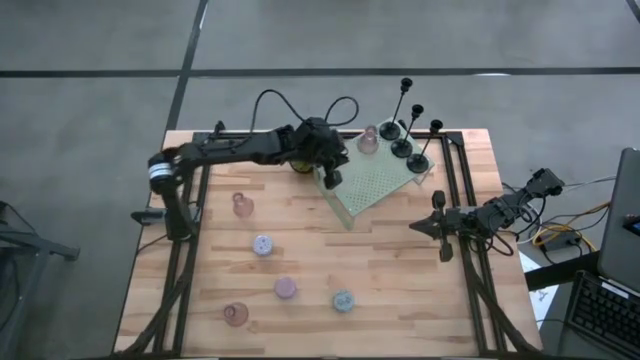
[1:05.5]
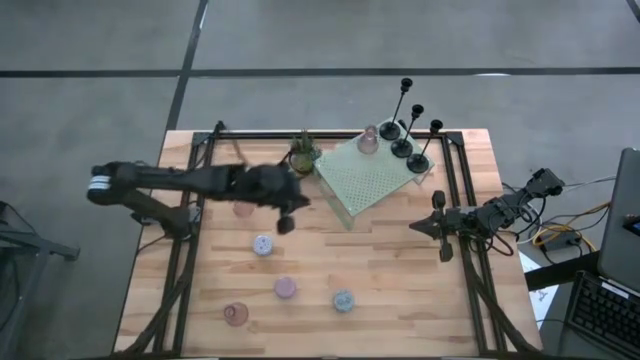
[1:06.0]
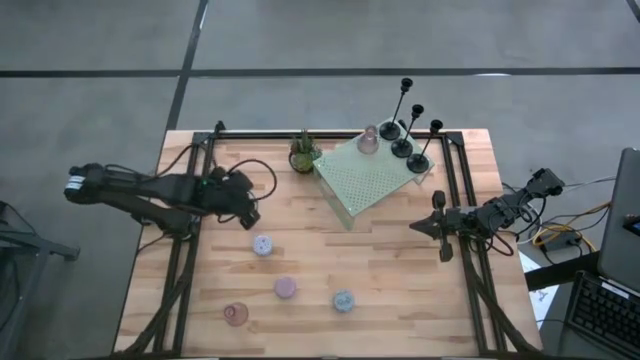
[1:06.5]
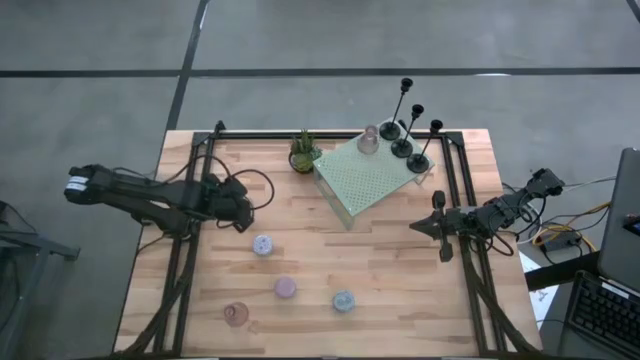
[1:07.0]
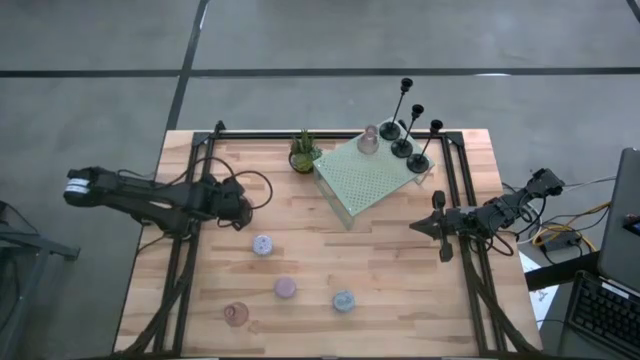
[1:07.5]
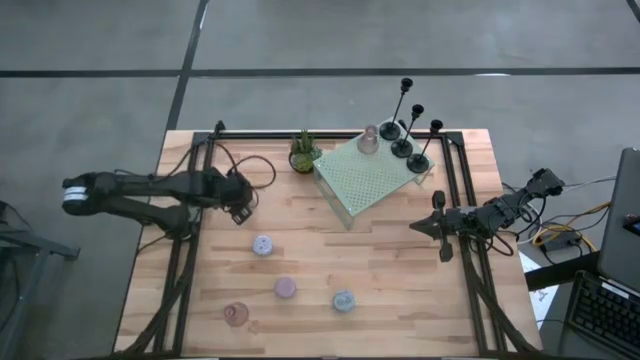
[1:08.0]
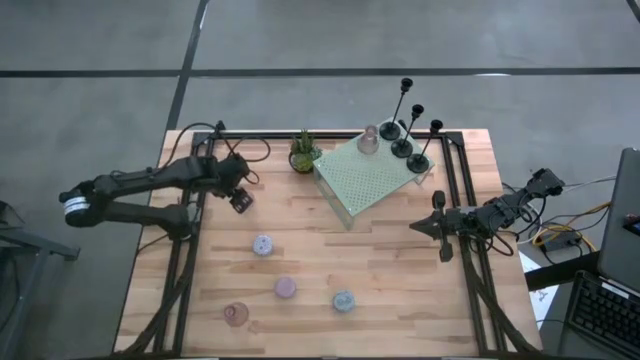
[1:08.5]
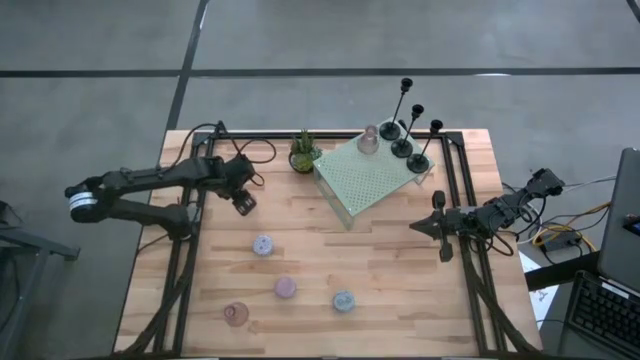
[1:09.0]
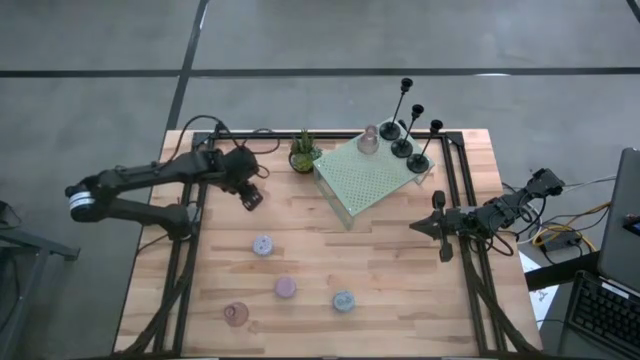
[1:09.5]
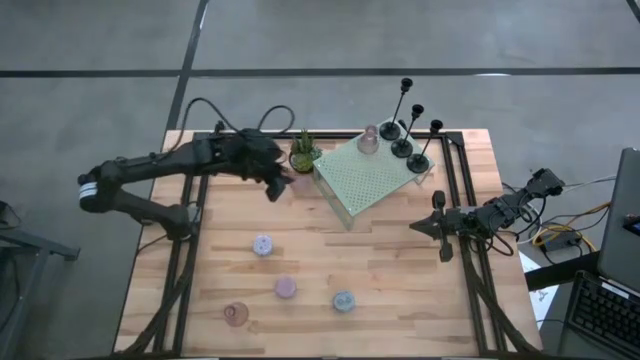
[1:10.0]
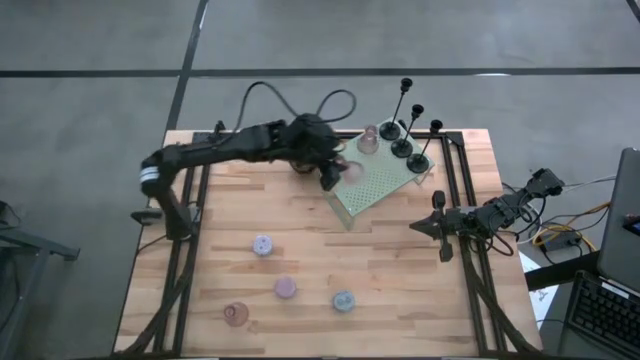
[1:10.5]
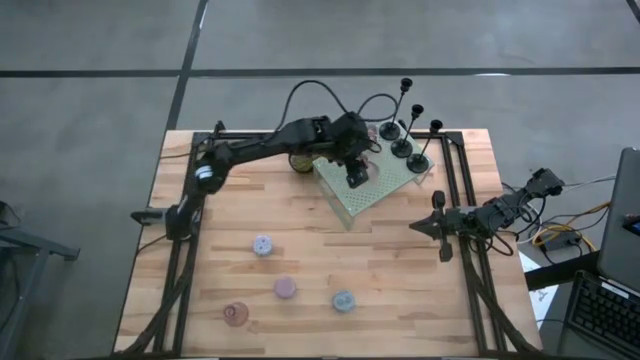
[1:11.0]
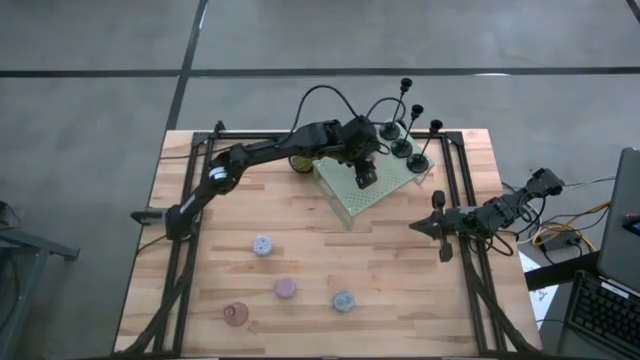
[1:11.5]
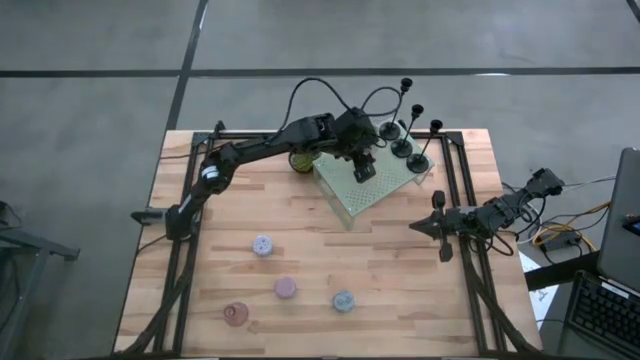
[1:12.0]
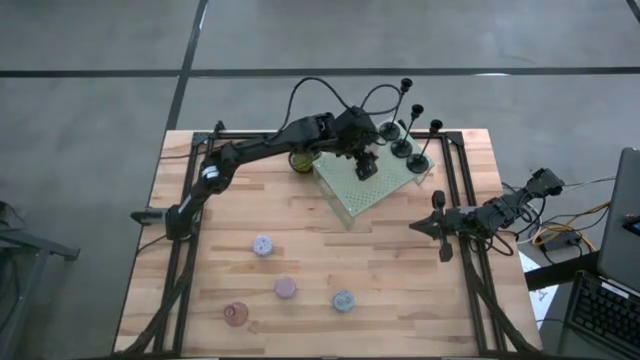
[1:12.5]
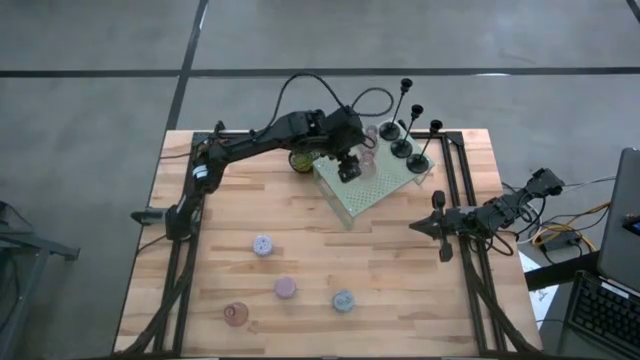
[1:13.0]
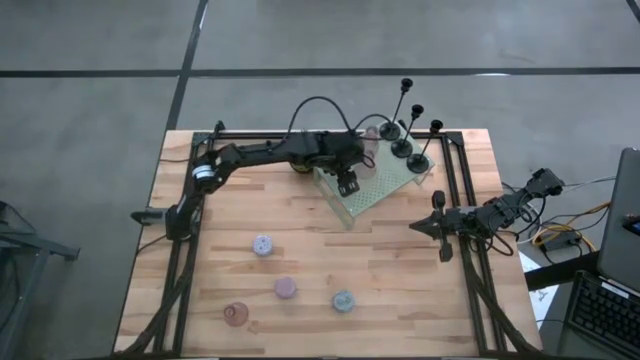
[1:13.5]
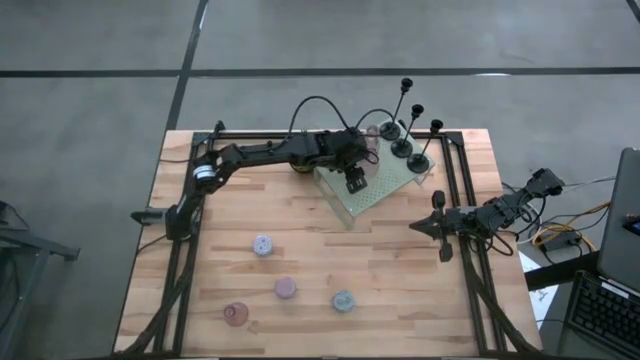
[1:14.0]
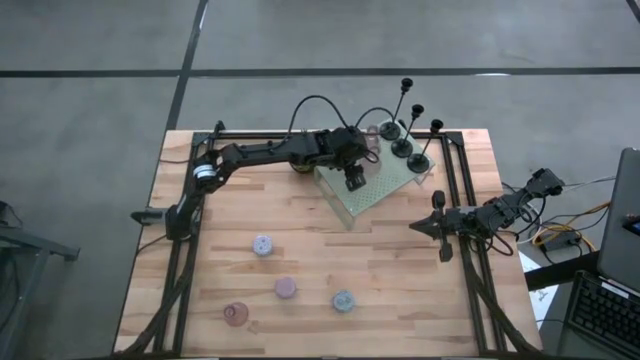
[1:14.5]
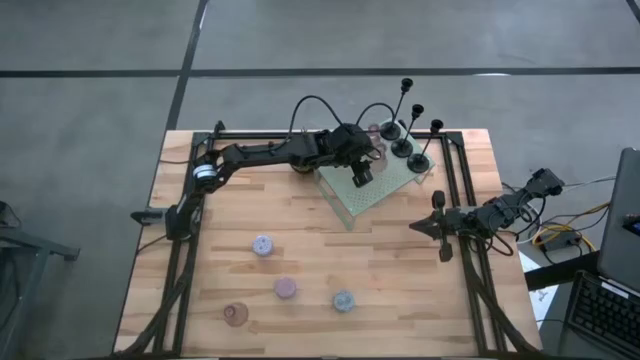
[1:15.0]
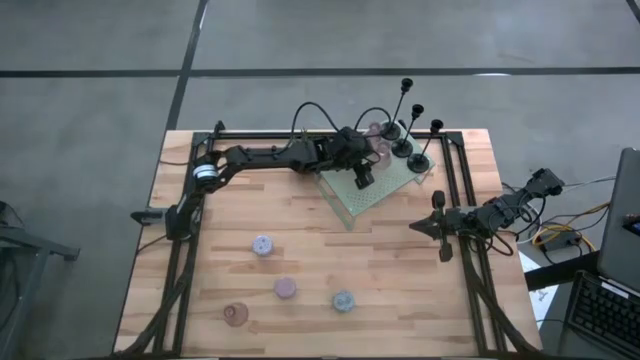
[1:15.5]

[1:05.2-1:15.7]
Task: Pick & Place candle stick holders
Put the top pink candle holder on the shelf aligned with the other pink candle holder

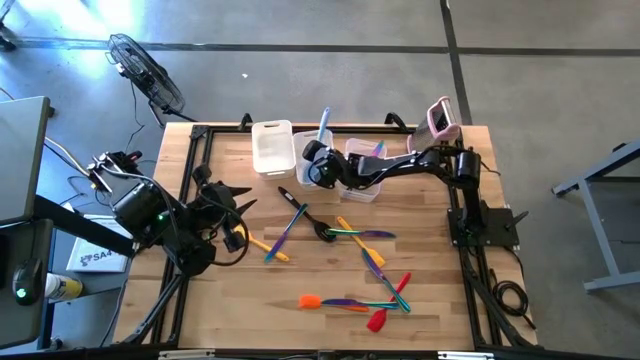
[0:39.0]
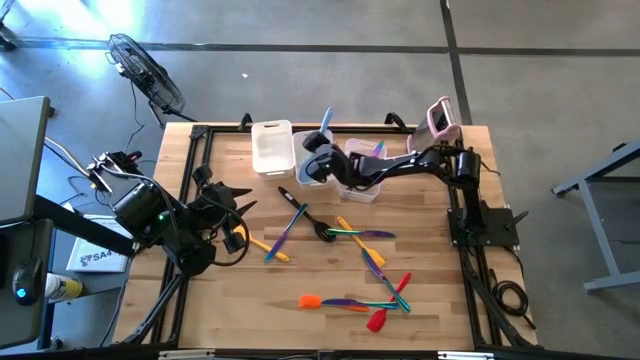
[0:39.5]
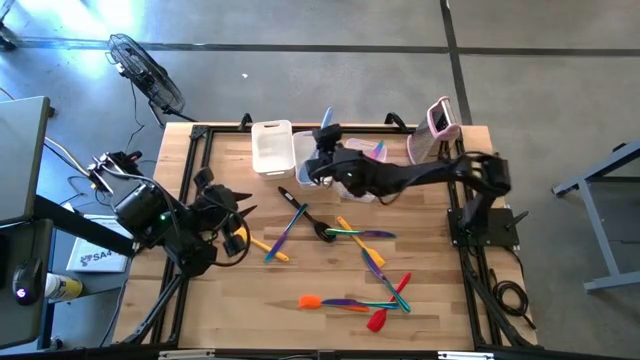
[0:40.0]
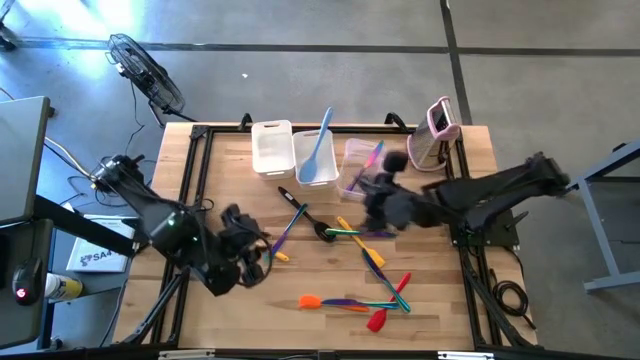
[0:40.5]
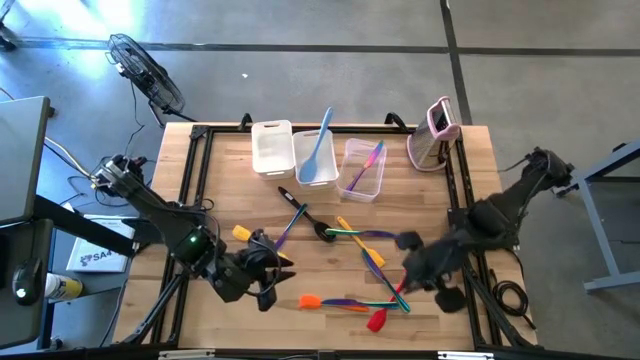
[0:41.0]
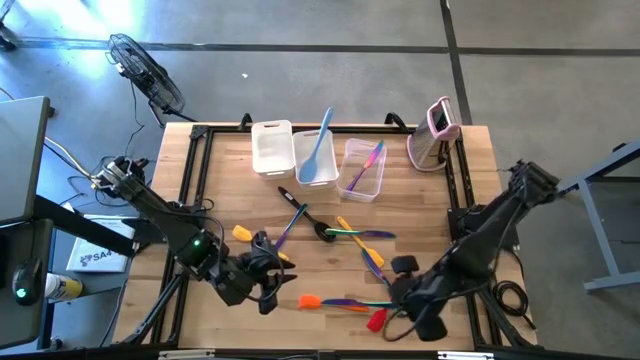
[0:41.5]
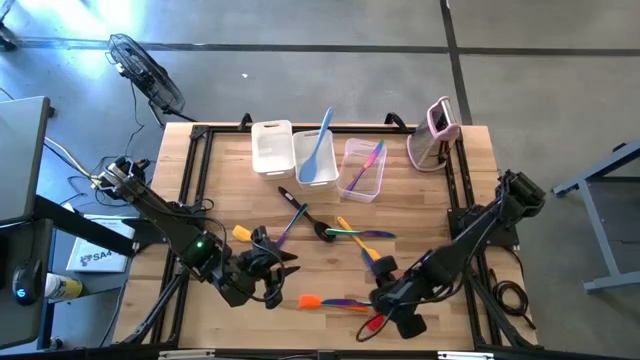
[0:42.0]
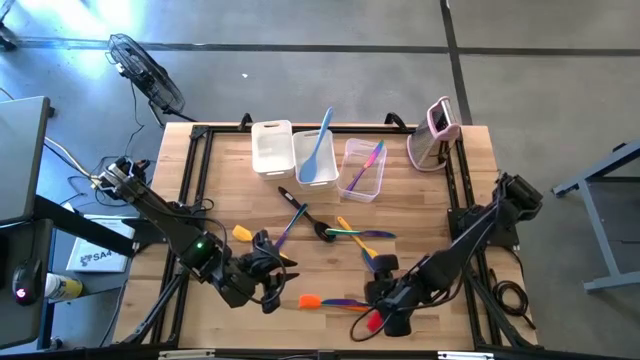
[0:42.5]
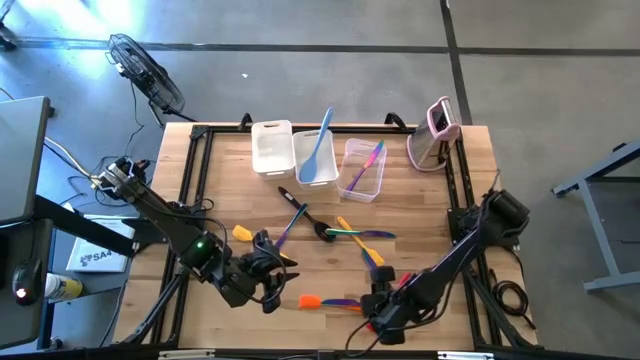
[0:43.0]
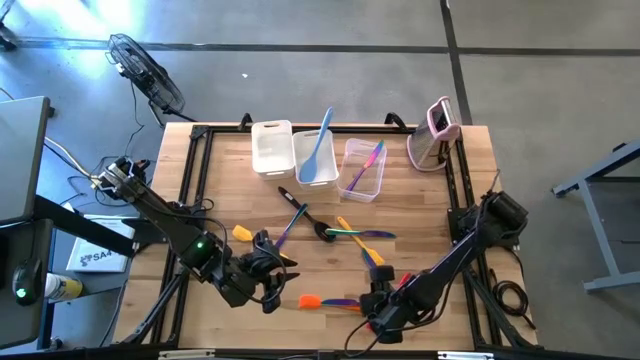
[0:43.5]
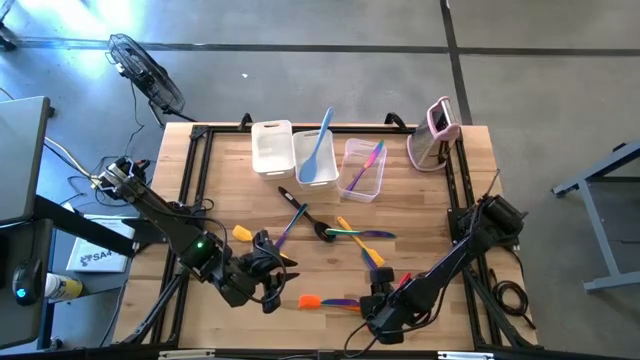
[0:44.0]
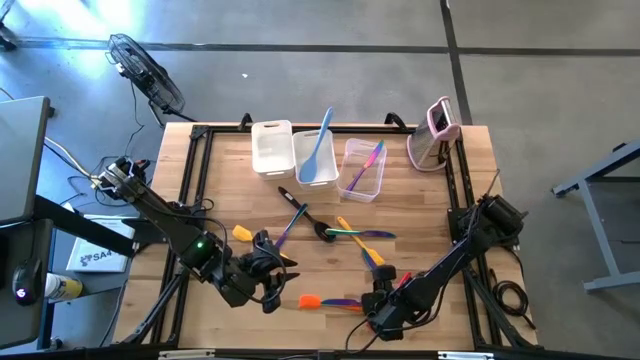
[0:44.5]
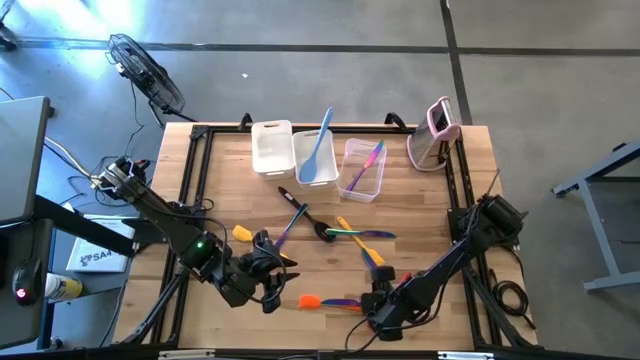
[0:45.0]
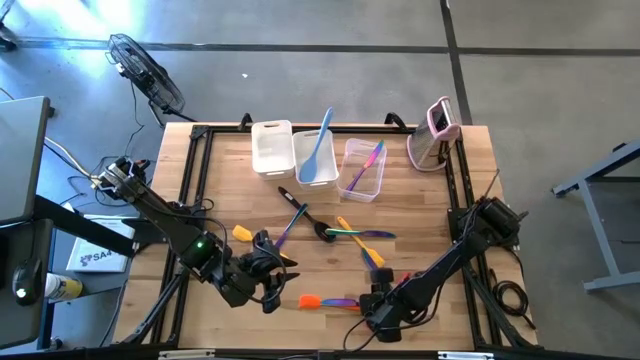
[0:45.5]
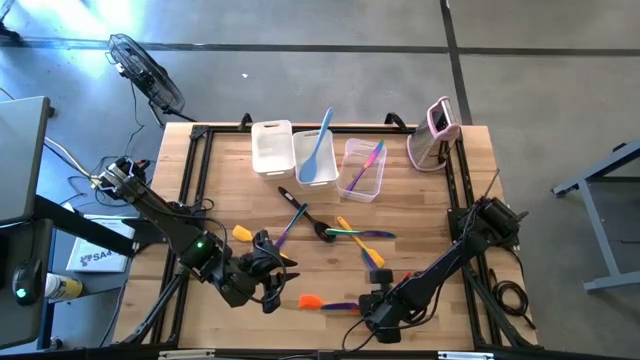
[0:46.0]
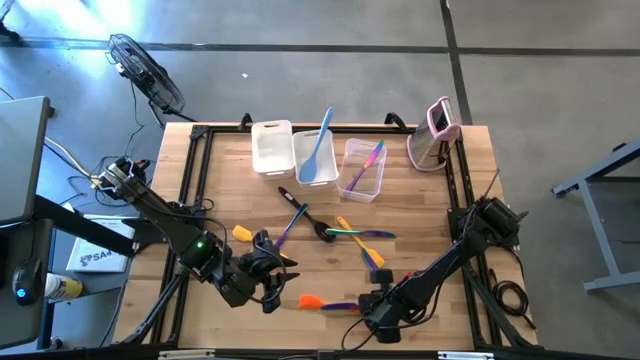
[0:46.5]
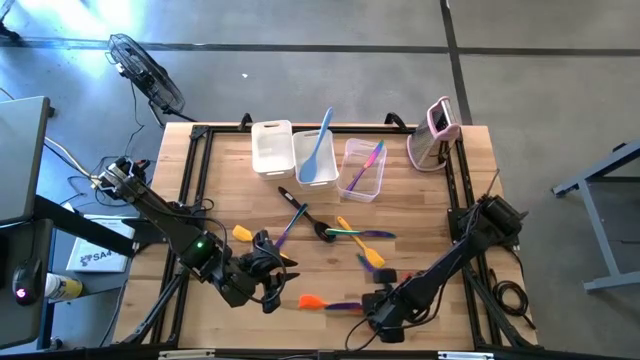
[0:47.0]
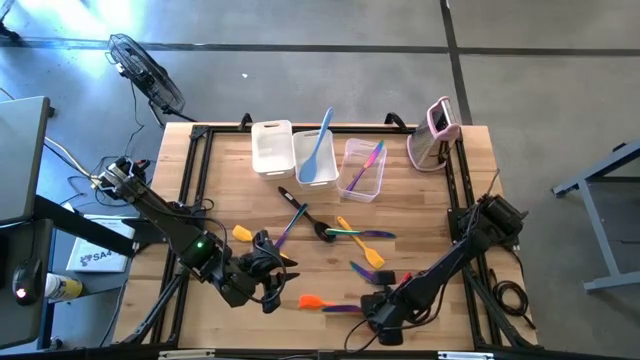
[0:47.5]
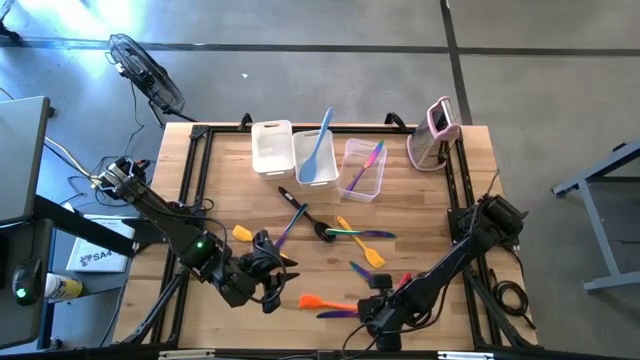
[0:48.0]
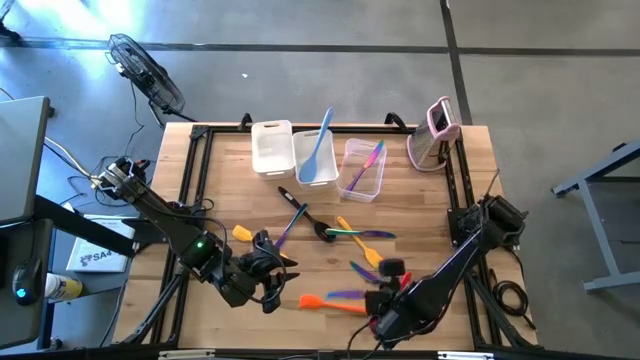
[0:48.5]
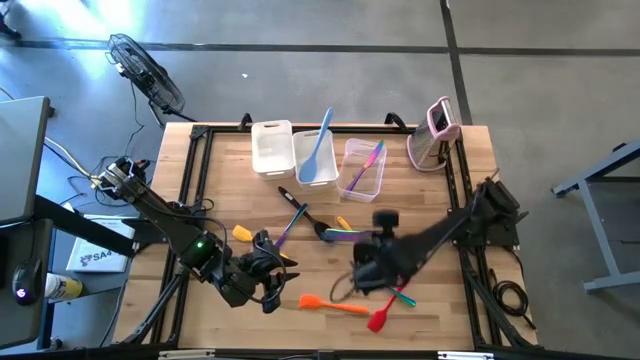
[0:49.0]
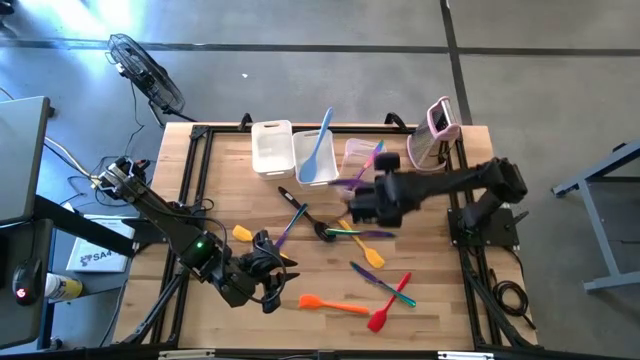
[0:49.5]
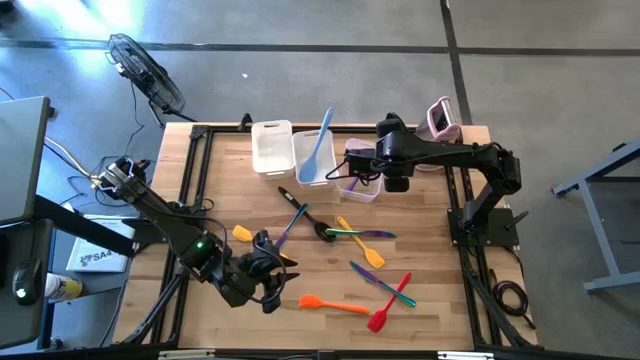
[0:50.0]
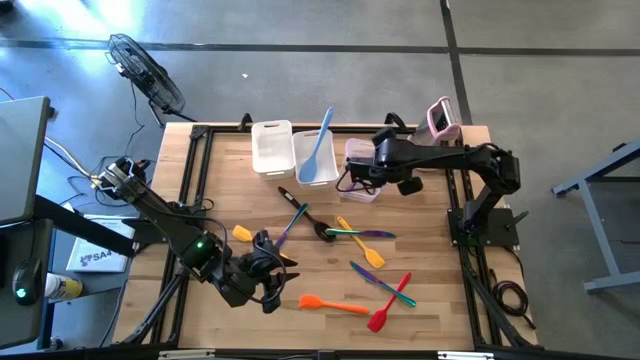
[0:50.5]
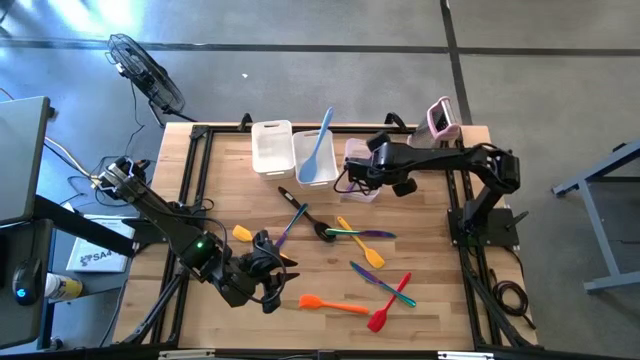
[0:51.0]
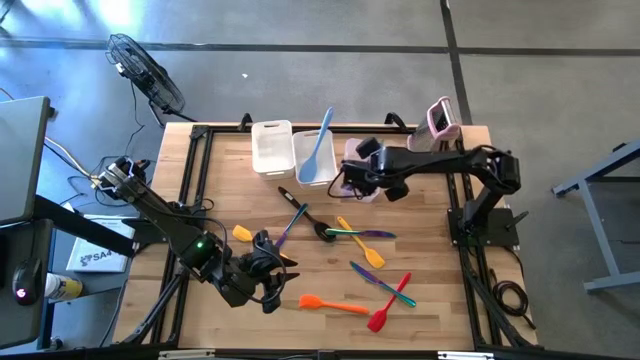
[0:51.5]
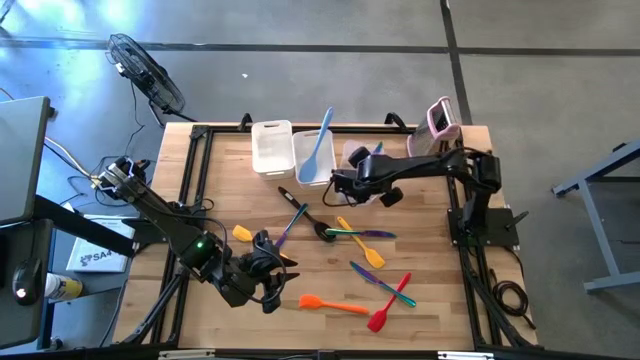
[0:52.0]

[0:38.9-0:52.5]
Task: Pick & Place Kitchen Items
Put the purple table knife into the transparent bin
